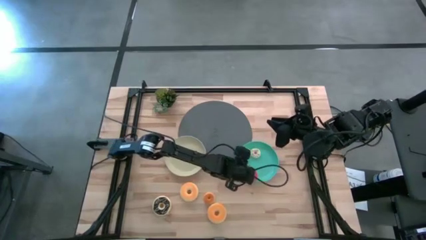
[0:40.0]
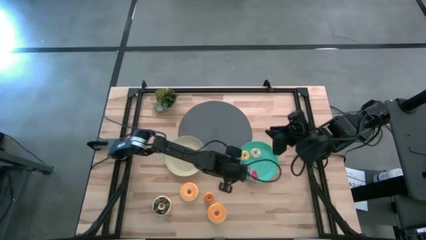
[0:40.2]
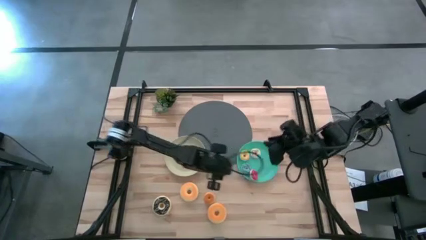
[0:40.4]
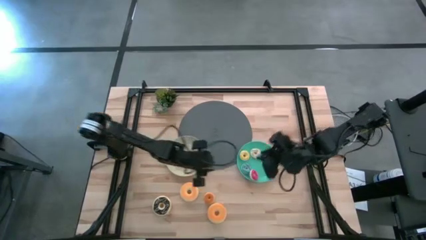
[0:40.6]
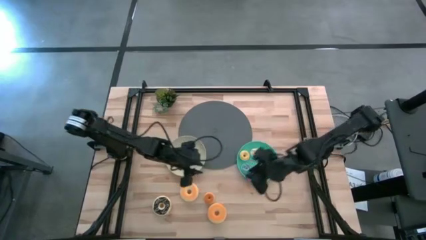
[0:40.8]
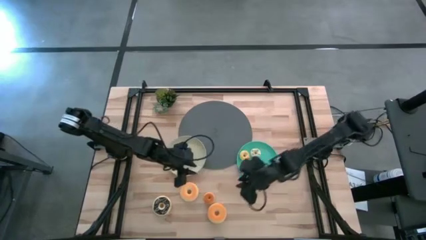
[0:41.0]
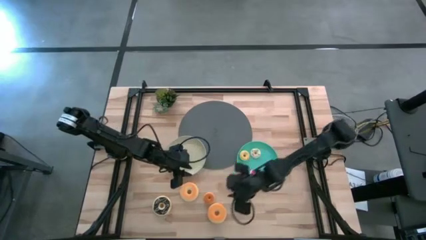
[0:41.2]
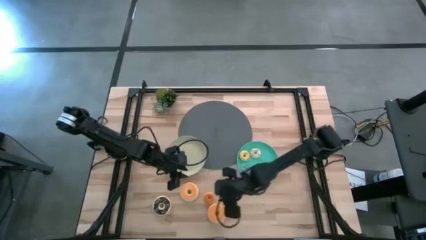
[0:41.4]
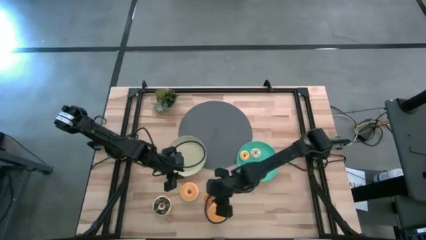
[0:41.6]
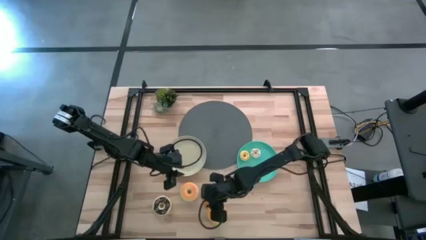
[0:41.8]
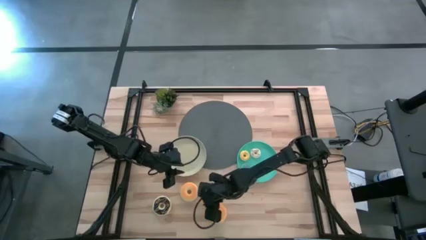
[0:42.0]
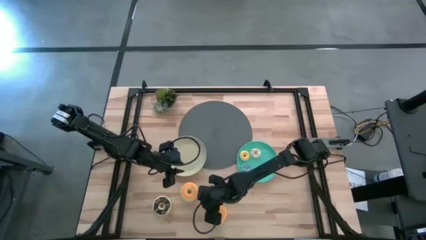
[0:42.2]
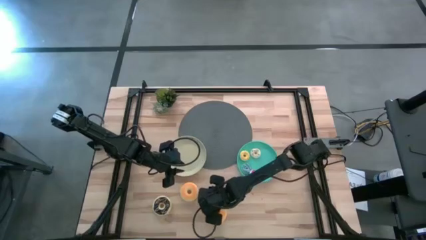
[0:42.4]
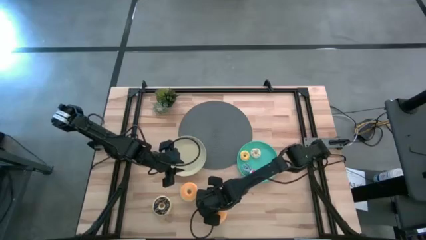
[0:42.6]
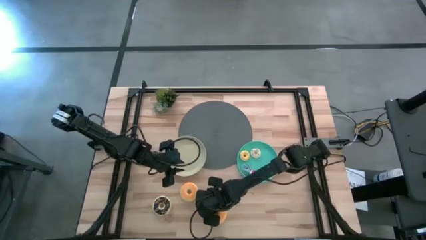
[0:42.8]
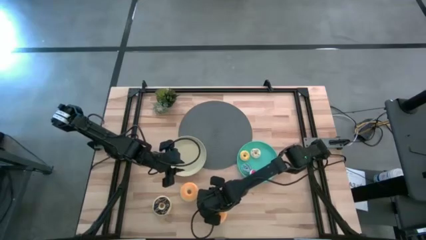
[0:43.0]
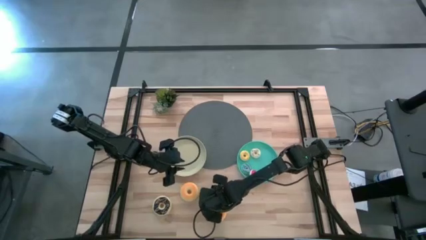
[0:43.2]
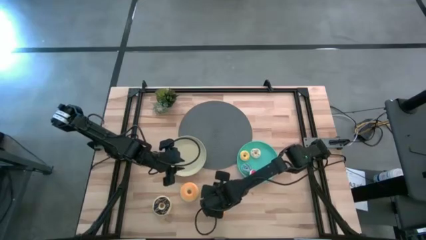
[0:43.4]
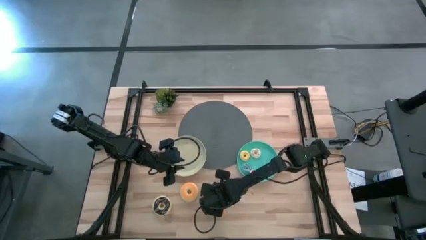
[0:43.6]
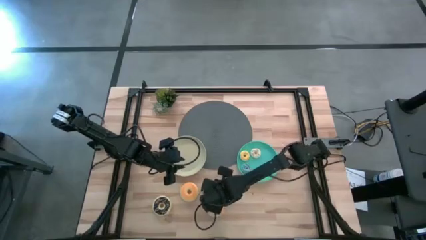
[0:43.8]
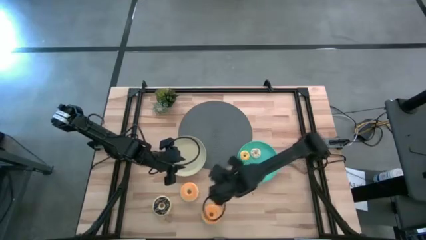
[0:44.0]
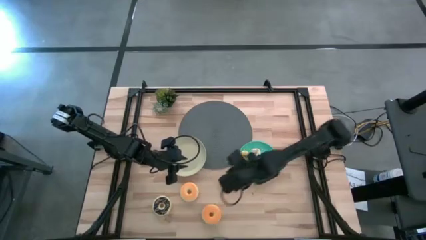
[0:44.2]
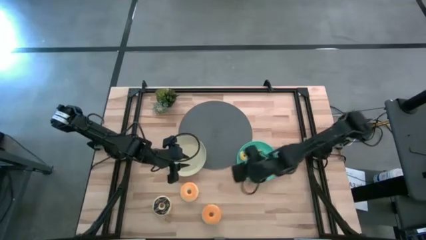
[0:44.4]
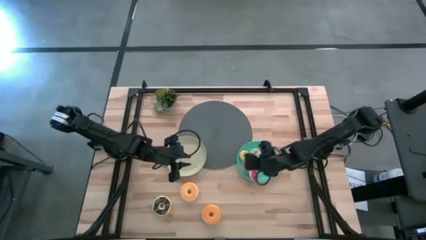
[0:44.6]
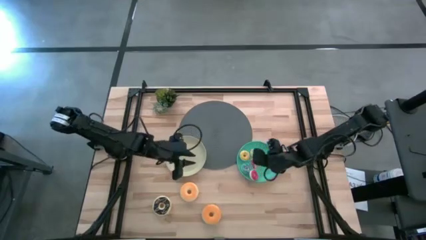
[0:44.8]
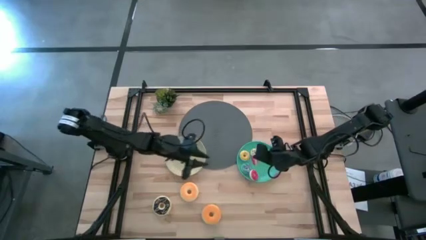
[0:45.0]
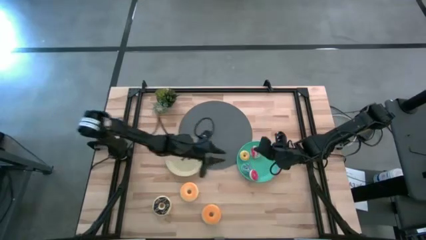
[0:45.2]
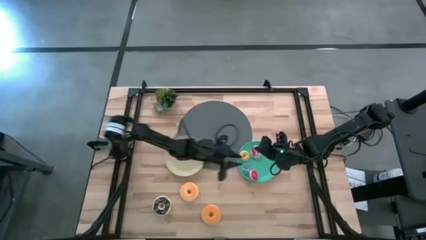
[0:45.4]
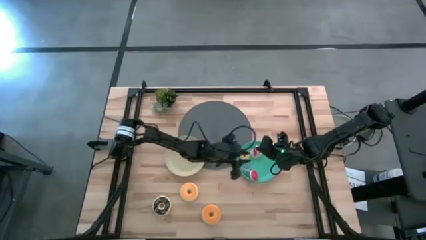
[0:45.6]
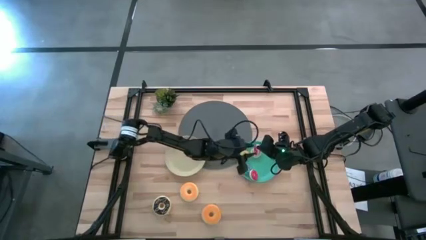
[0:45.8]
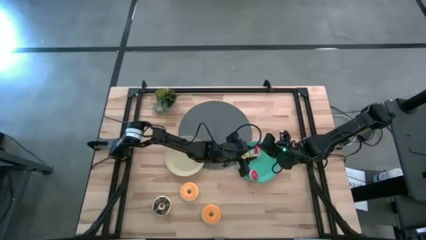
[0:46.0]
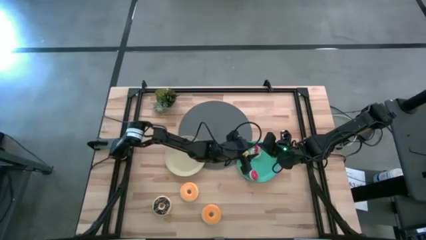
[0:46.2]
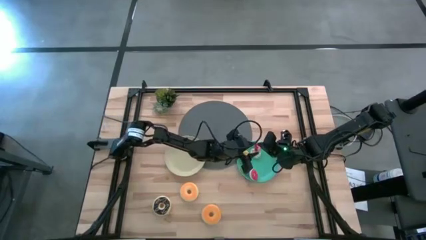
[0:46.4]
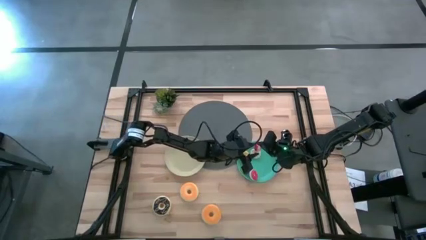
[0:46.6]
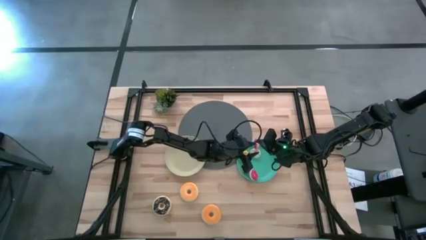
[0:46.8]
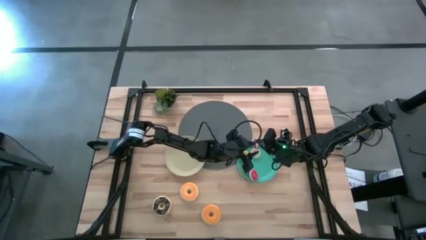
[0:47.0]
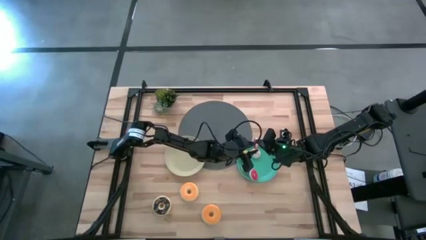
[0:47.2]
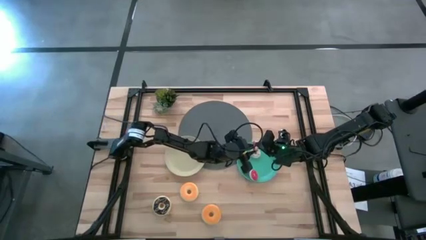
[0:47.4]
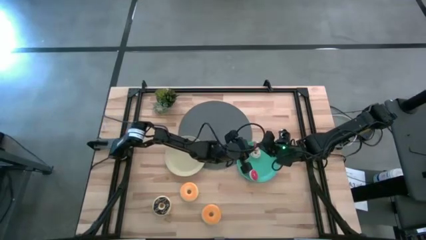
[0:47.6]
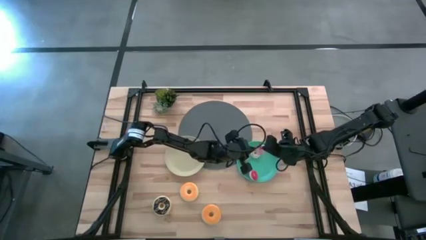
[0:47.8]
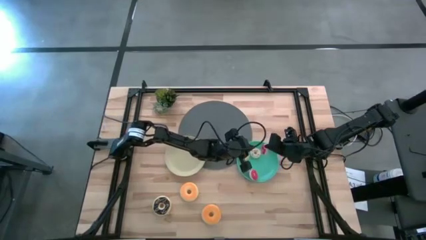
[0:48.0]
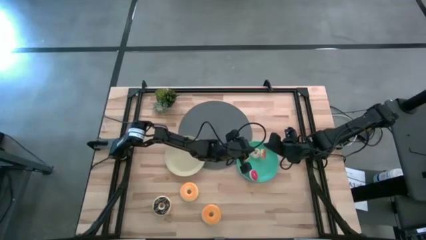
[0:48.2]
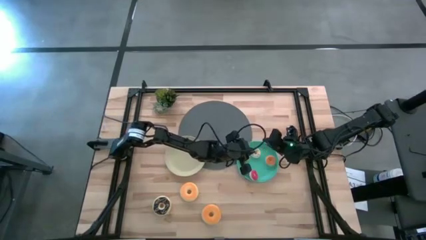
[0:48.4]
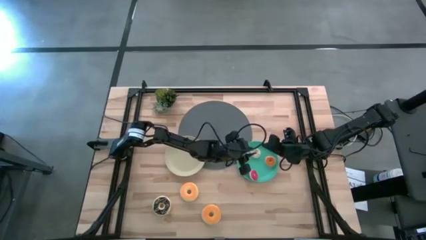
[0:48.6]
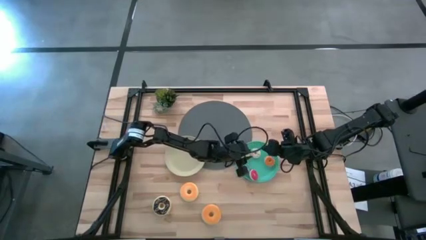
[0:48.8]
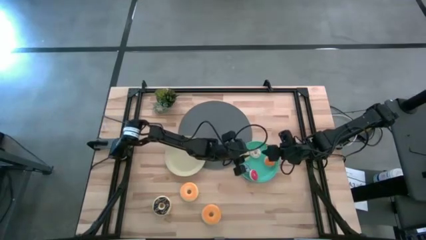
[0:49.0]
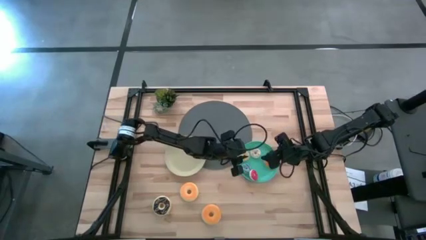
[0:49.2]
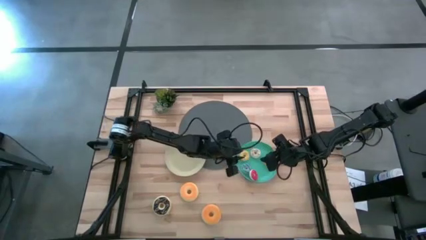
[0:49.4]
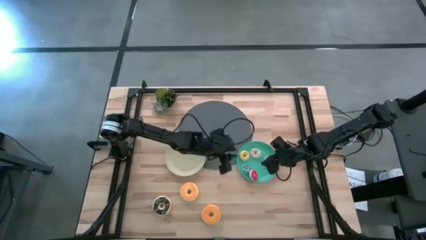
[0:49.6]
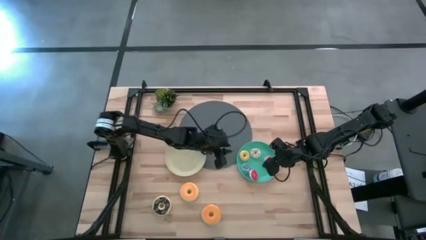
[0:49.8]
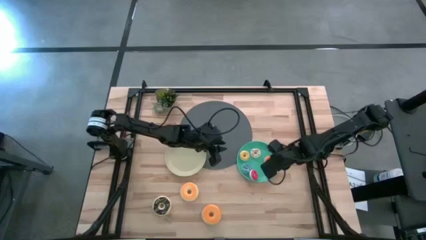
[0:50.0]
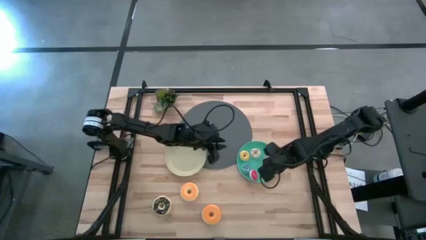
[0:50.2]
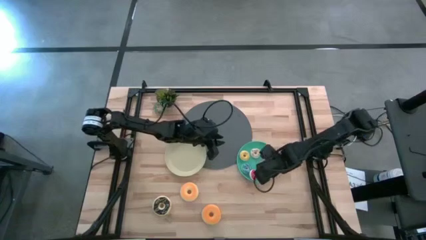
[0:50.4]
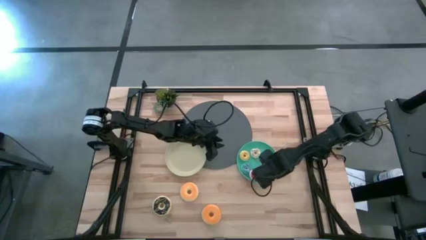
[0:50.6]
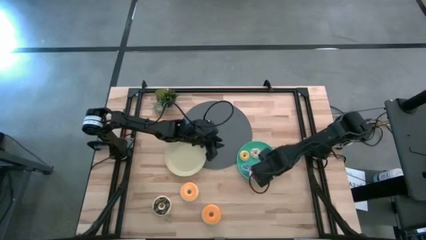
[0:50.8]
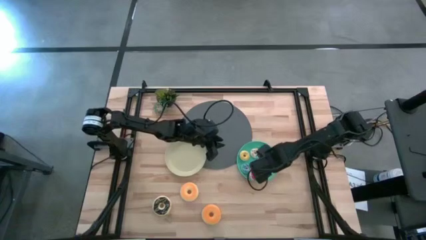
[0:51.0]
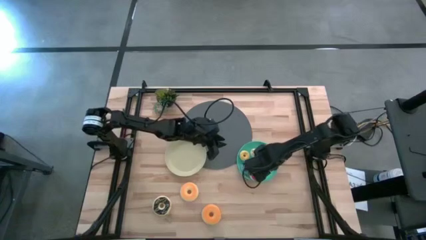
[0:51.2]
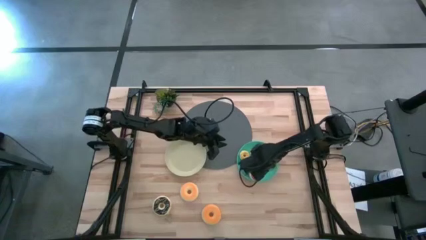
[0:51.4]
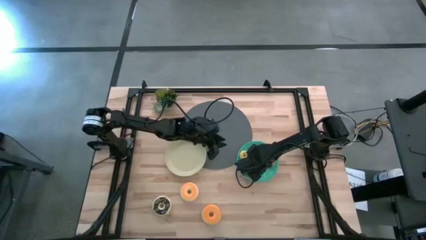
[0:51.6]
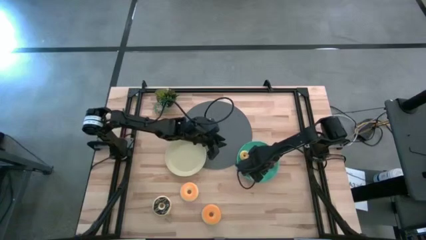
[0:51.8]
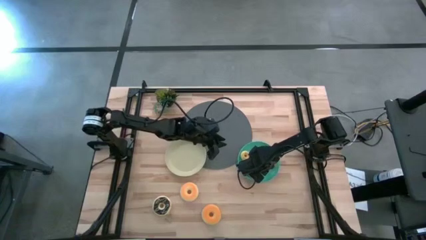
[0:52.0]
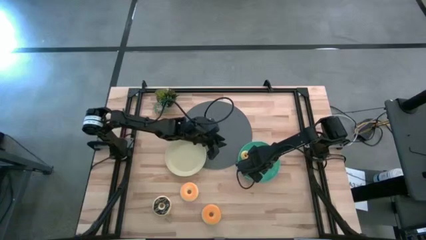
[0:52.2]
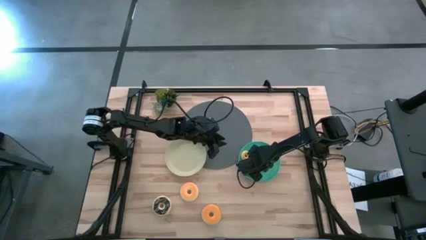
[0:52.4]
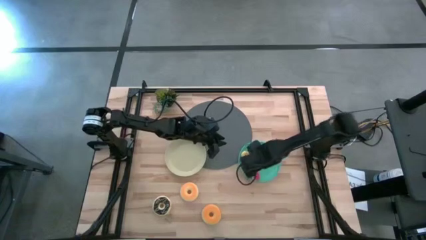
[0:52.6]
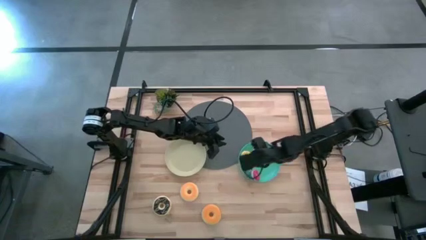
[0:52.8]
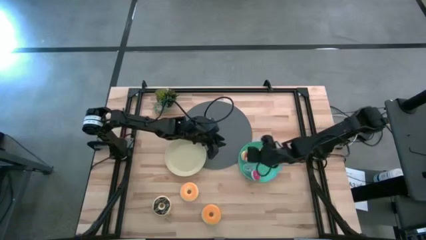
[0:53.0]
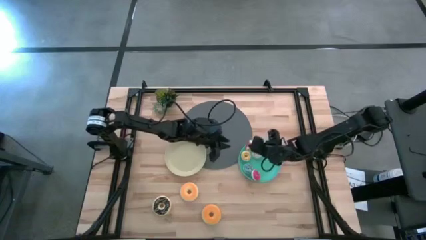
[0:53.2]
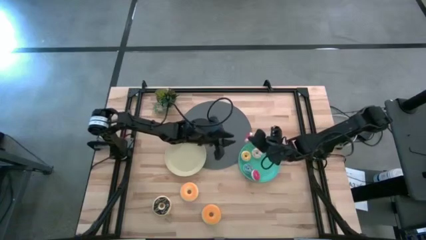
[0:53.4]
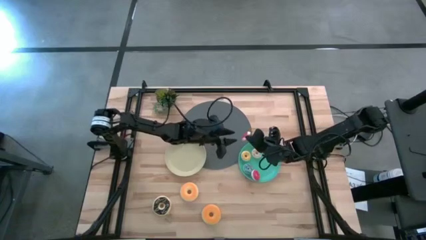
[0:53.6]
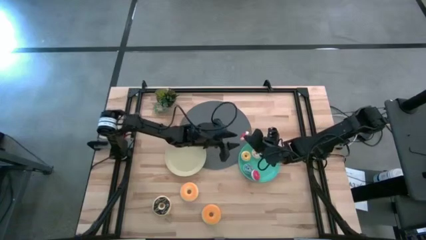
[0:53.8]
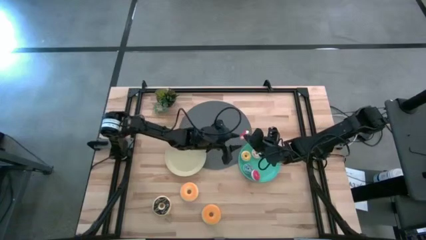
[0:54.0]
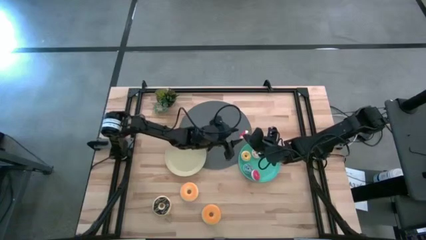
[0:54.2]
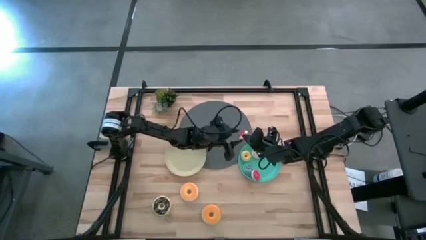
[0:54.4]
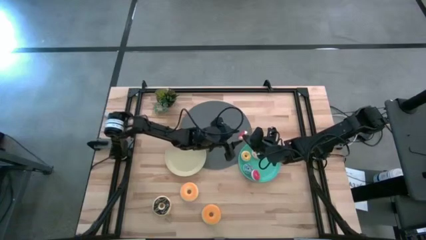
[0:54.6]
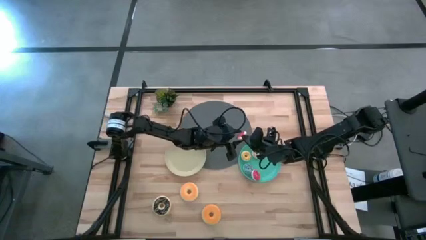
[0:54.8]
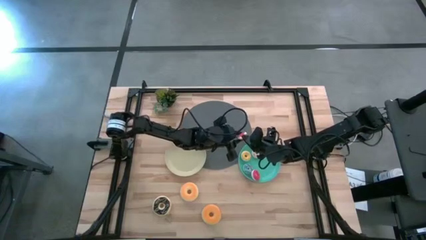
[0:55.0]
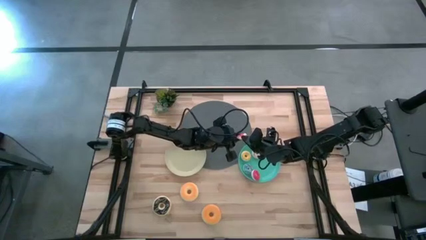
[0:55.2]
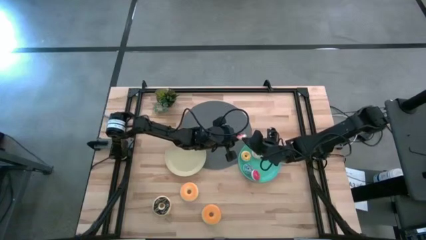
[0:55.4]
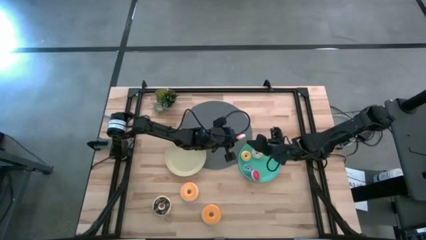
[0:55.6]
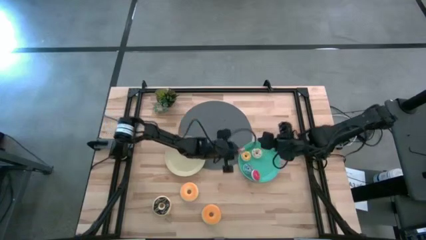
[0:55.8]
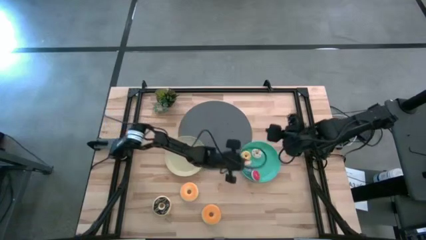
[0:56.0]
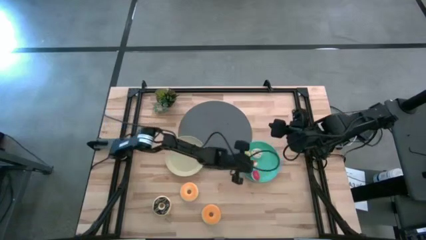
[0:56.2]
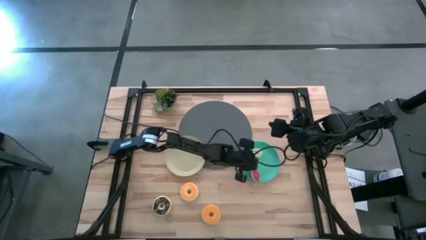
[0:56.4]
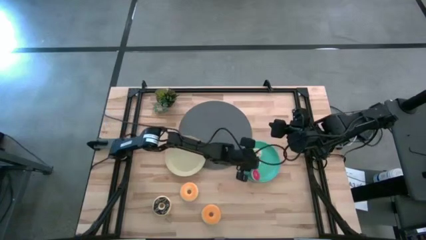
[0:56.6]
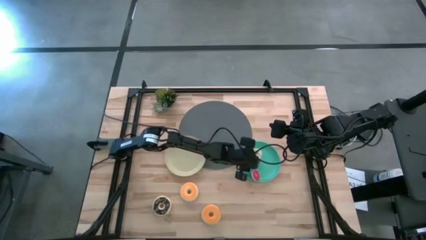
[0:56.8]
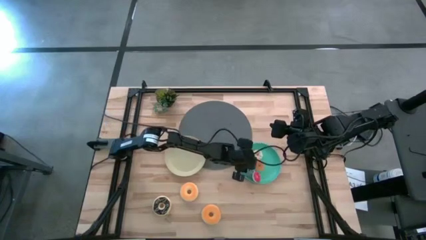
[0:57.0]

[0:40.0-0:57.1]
Task: Pick & Place donuts
Put the small orange donut on the green plate
